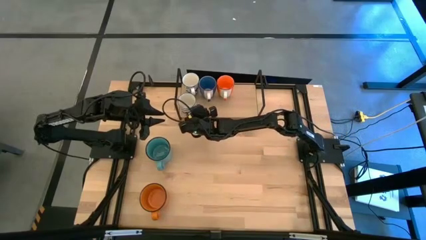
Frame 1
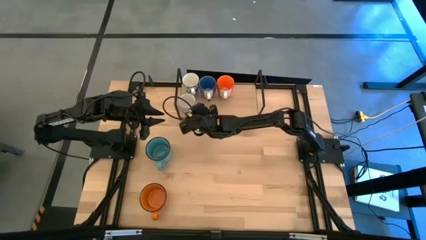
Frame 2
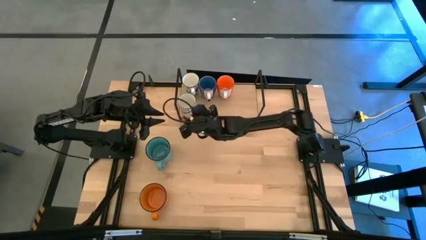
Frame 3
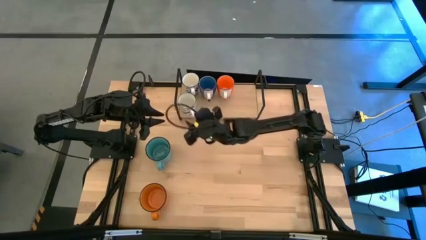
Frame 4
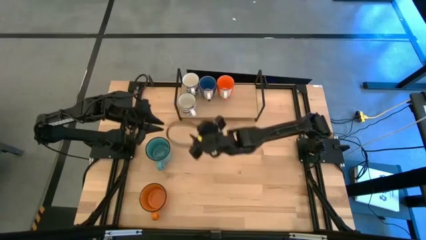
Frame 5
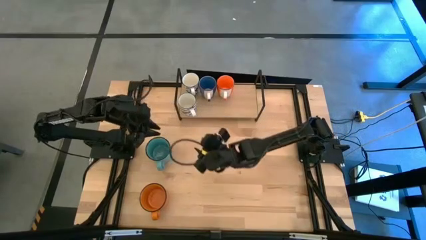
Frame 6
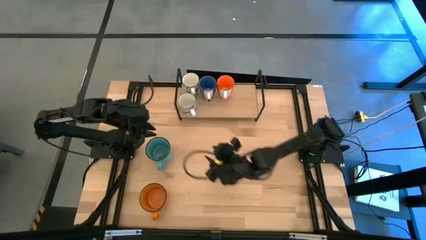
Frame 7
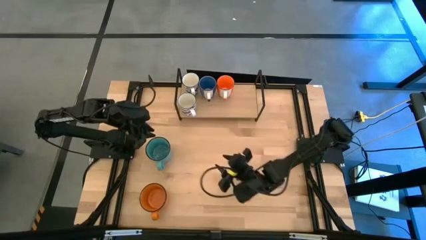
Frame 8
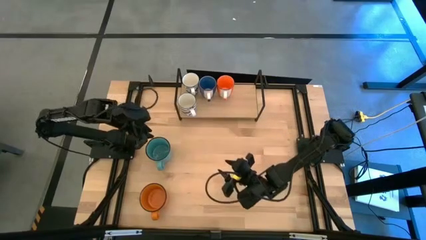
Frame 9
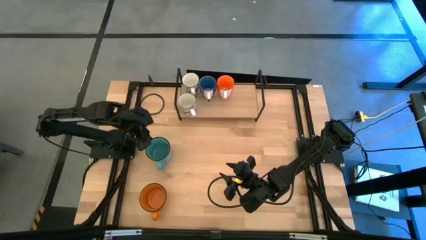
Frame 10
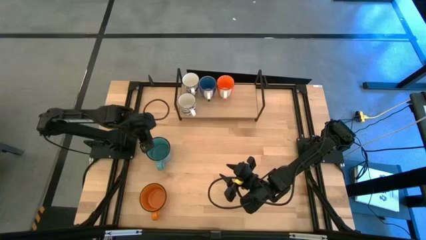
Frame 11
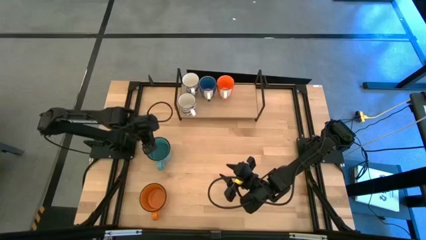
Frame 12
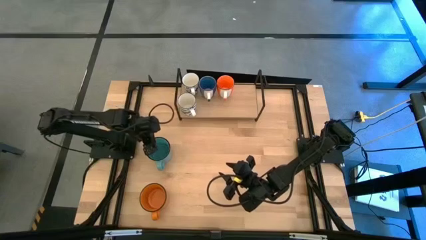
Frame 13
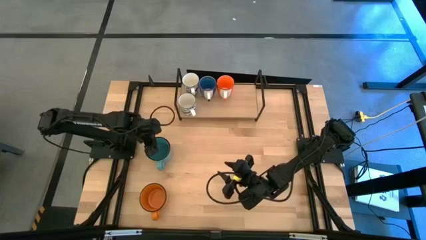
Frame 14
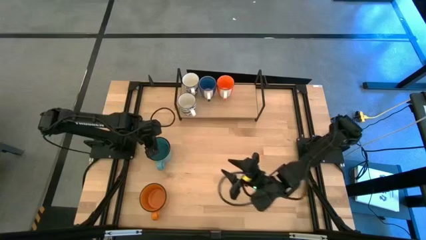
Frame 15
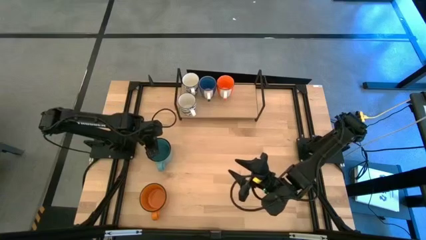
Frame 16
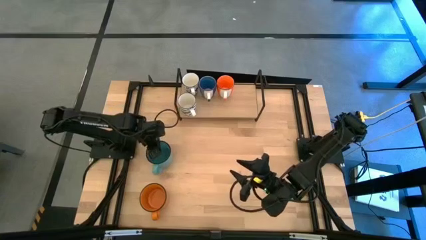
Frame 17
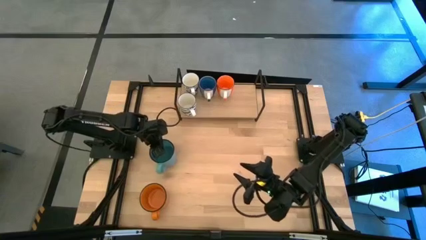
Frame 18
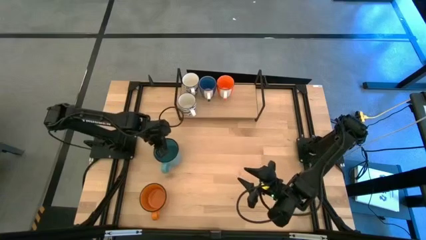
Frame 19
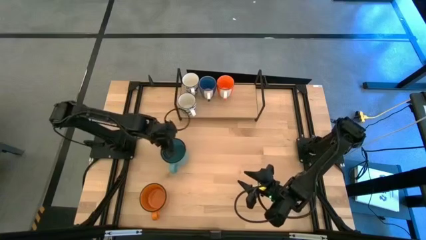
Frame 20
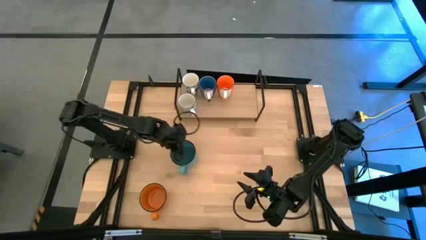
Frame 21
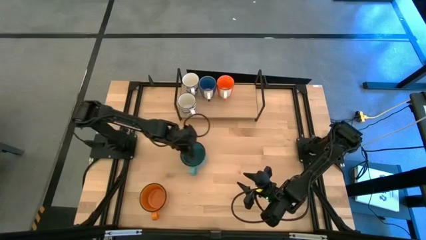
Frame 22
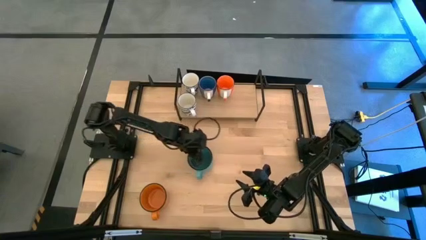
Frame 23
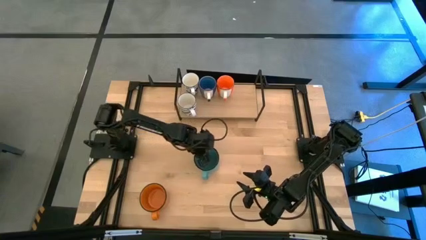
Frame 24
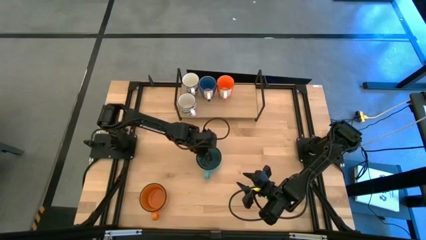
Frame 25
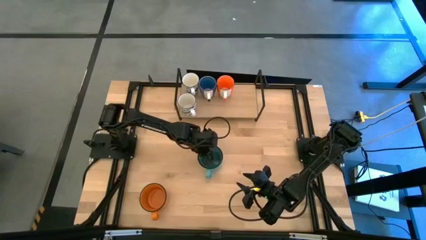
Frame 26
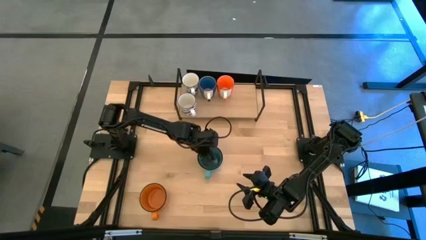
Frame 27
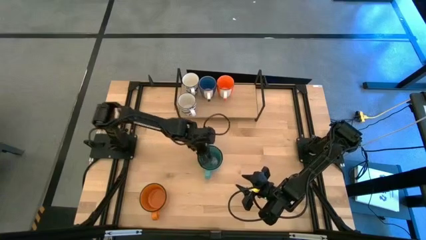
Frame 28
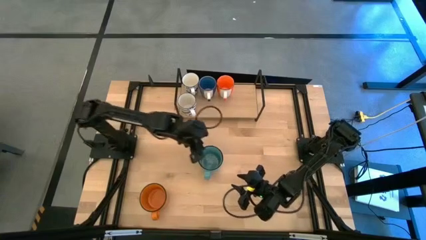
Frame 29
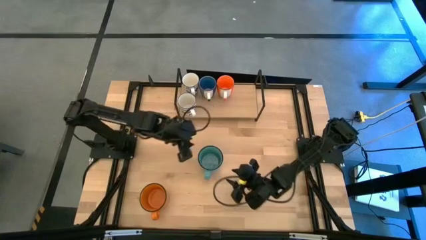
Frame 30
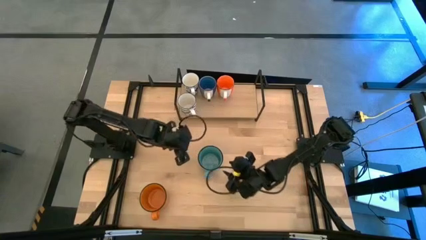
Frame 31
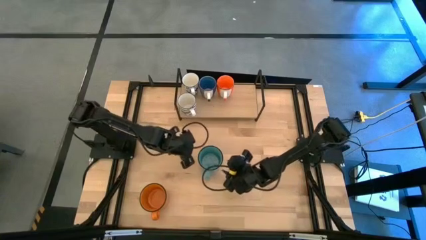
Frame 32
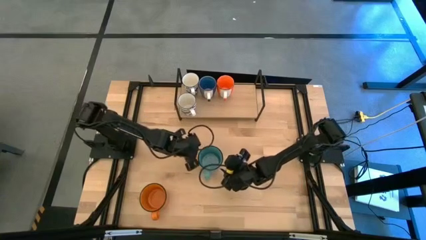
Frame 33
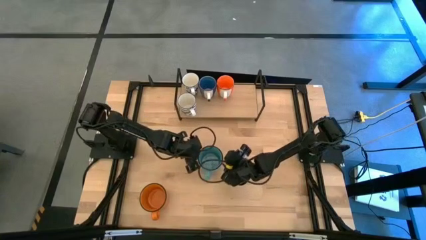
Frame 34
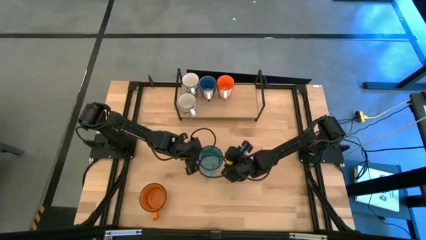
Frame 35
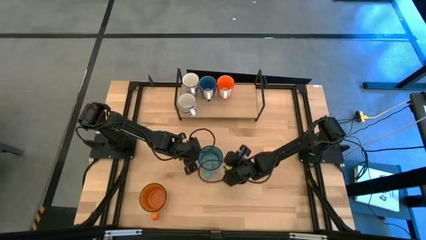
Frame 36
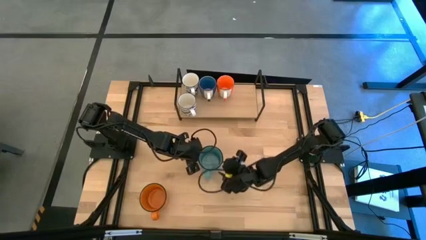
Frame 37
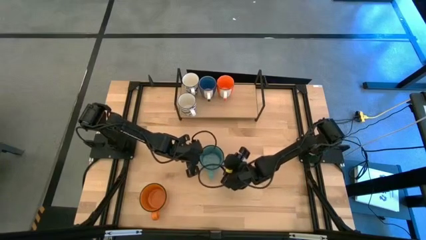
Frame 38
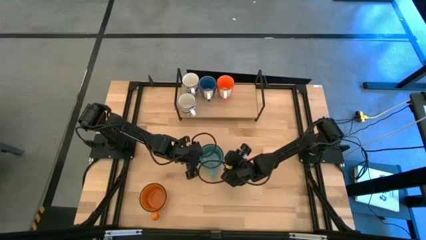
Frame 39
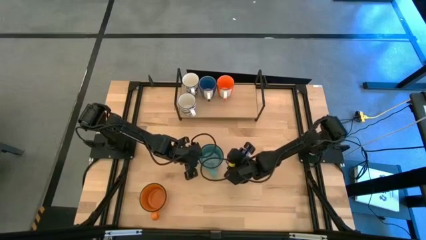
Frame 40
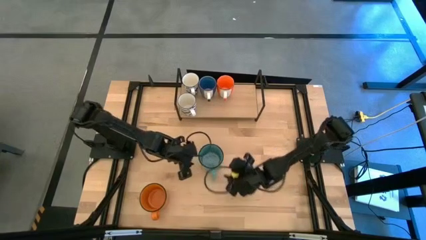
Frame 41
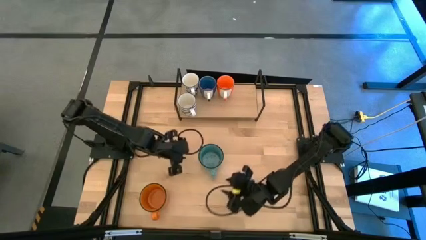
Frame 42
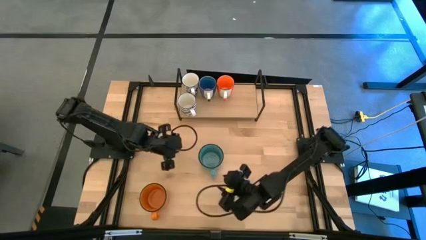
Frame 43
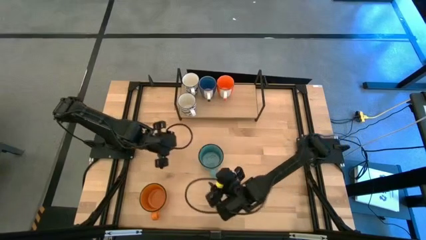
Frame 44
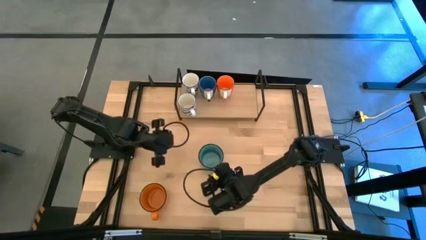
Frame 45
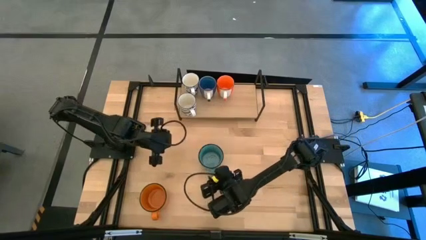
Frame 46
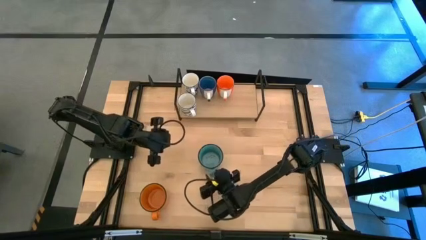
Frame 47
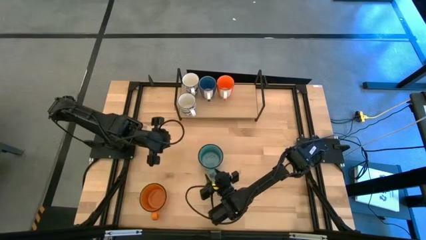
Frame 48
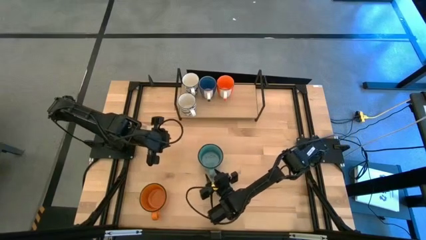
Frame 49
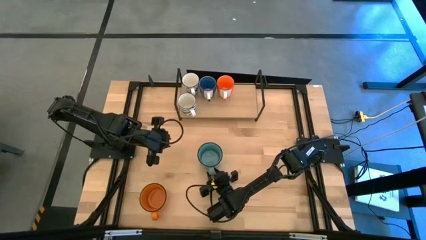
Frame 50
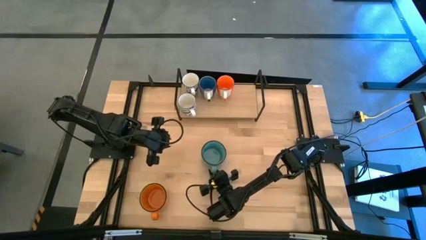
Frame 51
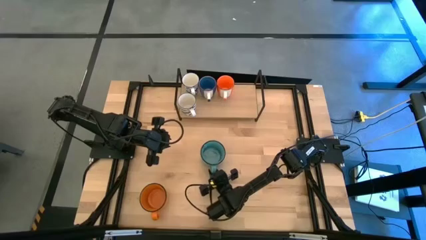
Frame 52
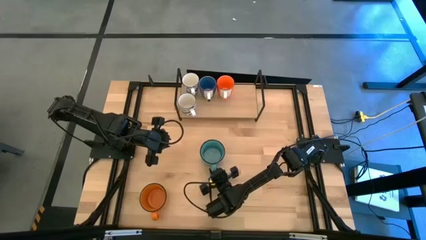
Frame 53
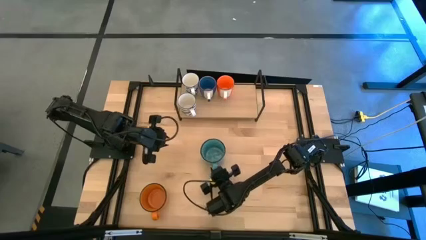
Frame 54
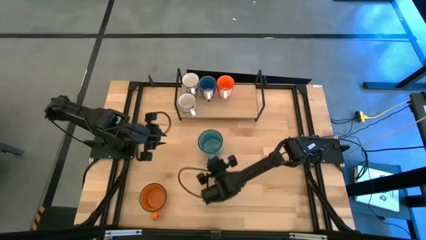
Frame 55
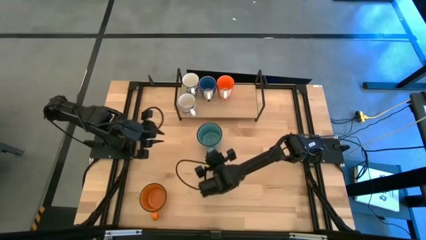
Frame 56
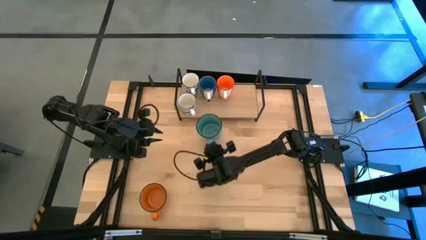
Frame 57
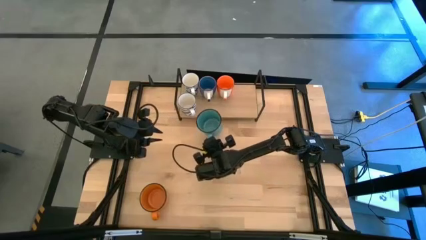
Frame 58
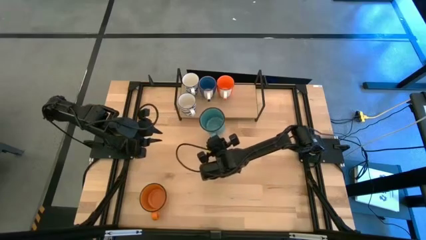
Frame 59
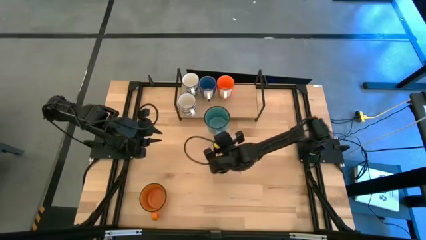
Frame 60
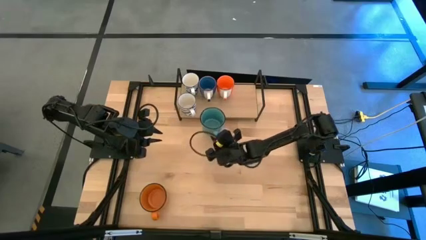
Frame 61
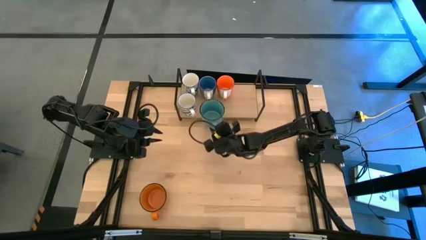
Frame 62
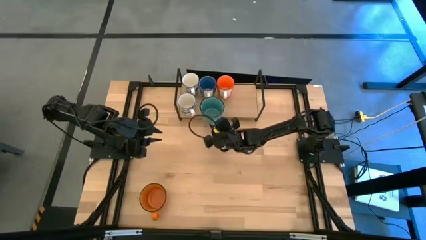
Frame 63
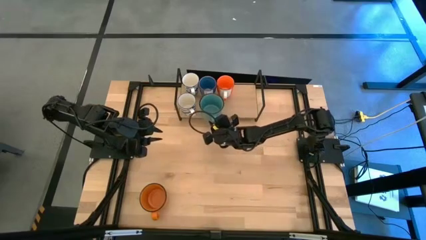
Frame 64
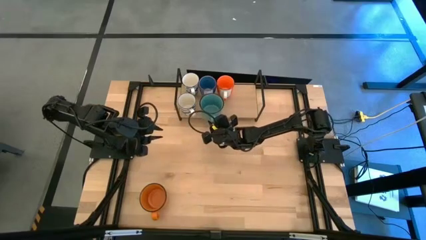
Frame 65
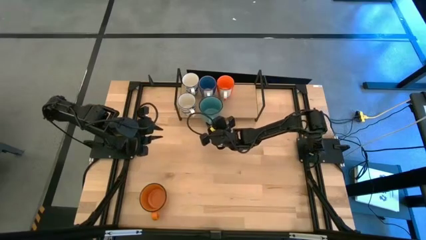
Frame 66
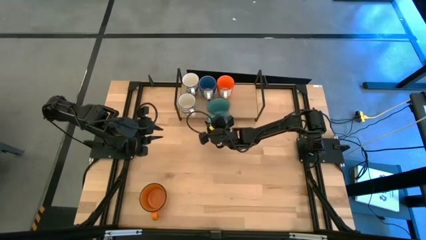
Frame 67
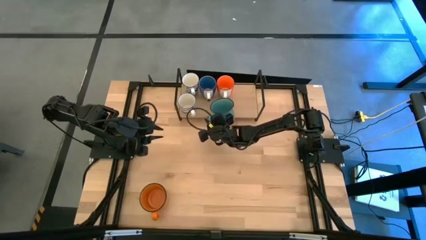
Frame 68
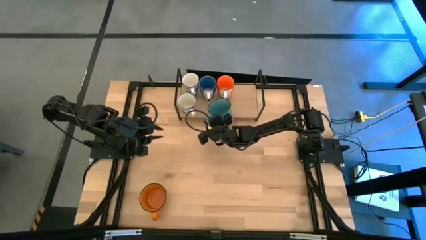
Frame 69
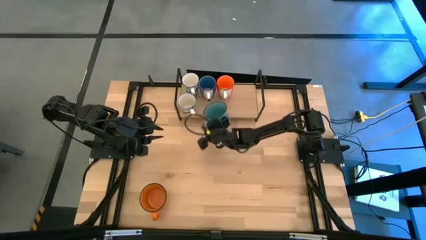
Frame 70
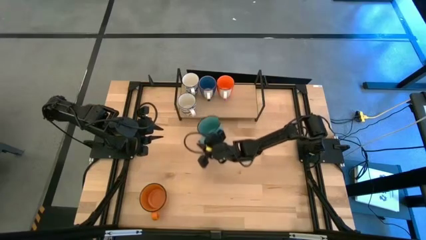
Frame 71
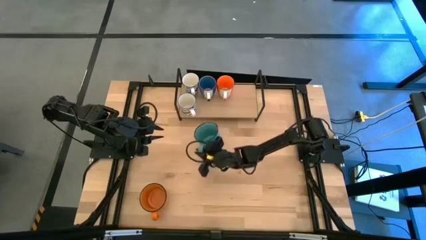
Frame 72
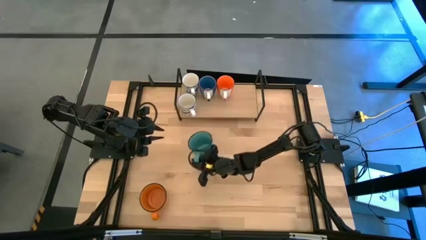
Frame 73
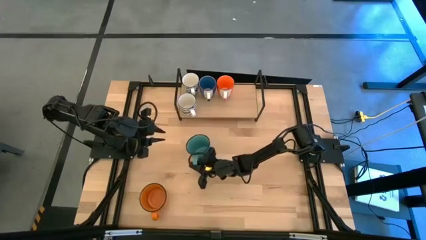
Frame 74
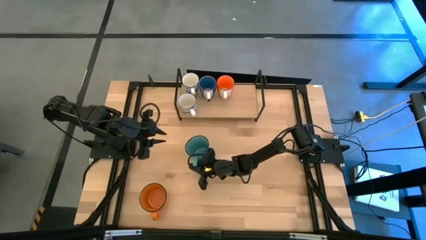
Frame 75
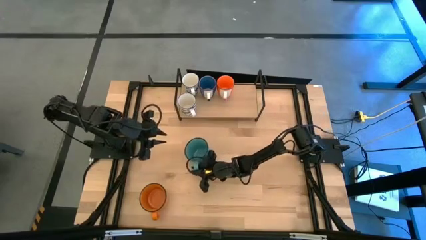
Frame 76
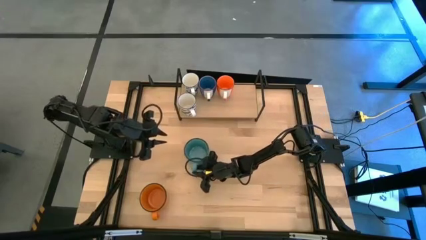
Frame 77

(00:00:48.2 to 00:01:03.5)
Task: Place coffee mugs
Put the green mug on the shelf
